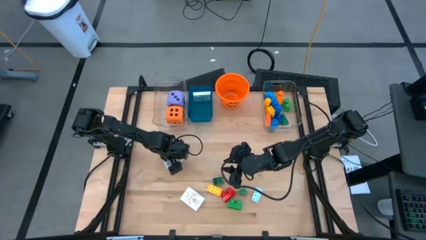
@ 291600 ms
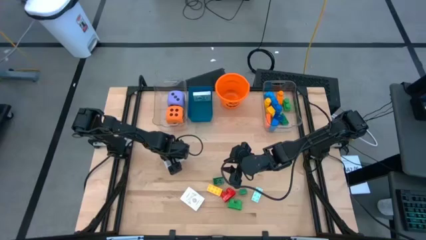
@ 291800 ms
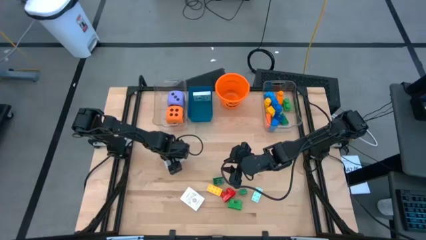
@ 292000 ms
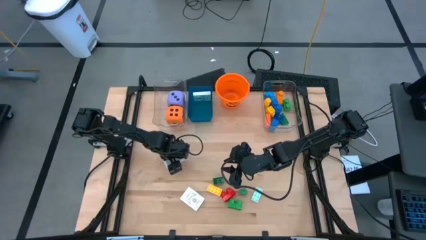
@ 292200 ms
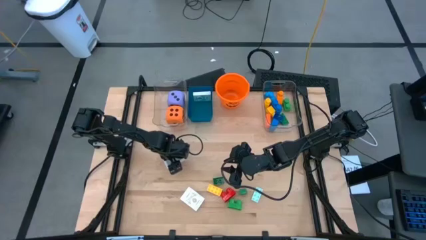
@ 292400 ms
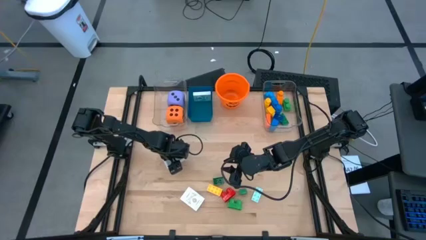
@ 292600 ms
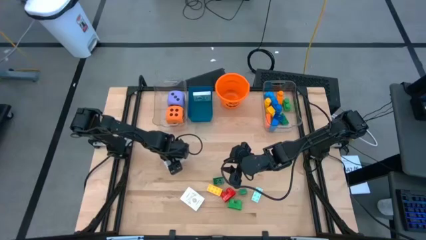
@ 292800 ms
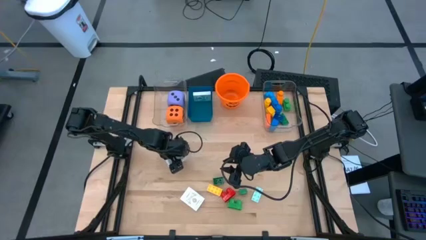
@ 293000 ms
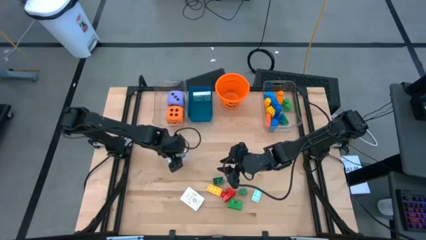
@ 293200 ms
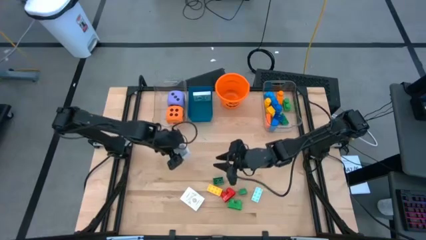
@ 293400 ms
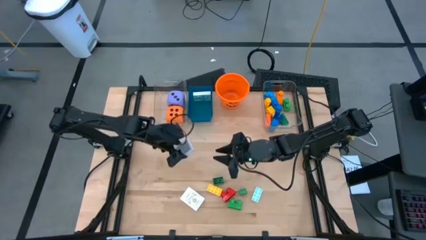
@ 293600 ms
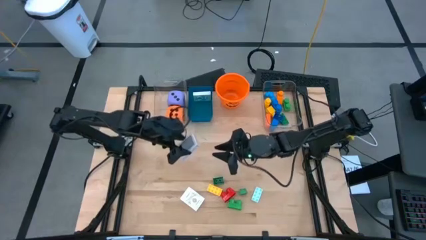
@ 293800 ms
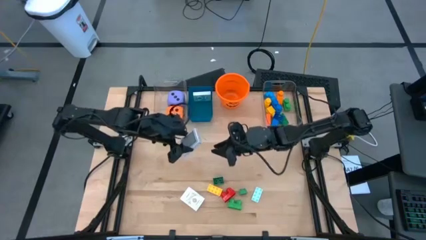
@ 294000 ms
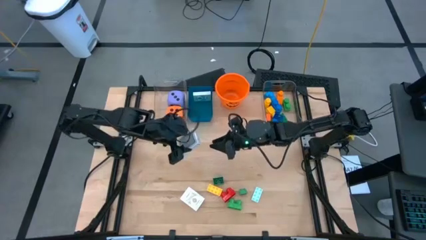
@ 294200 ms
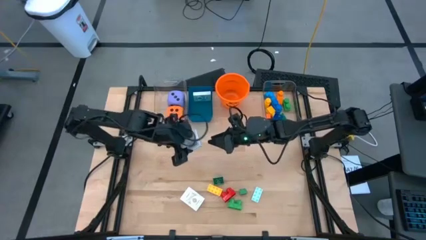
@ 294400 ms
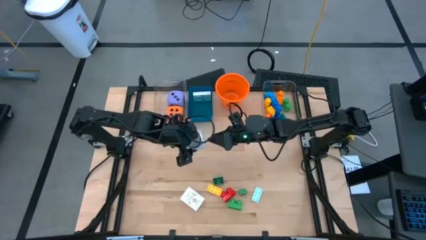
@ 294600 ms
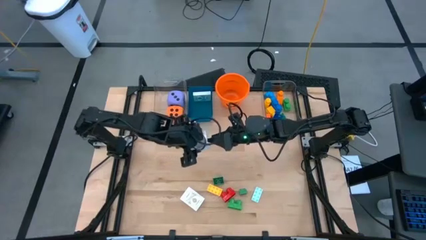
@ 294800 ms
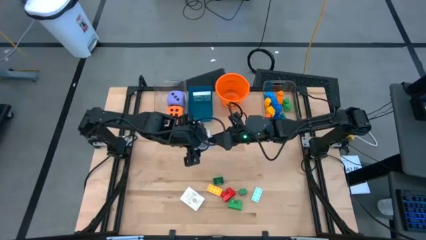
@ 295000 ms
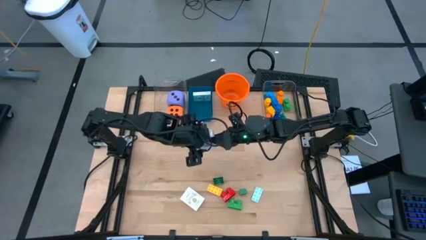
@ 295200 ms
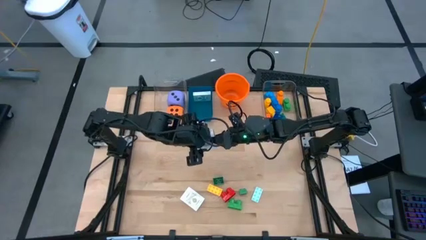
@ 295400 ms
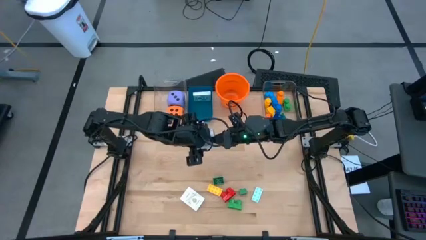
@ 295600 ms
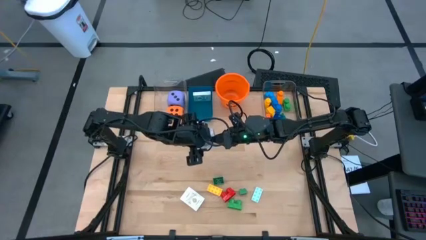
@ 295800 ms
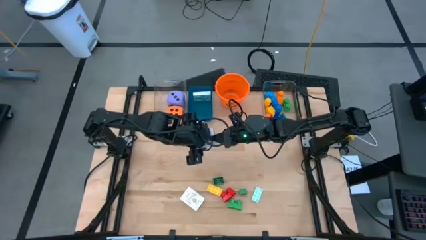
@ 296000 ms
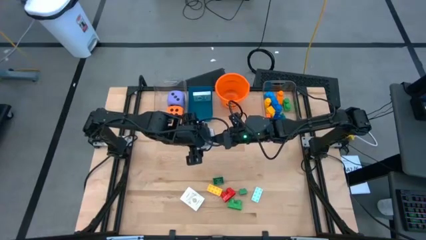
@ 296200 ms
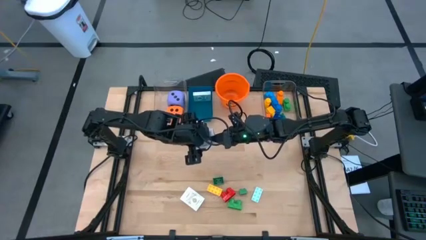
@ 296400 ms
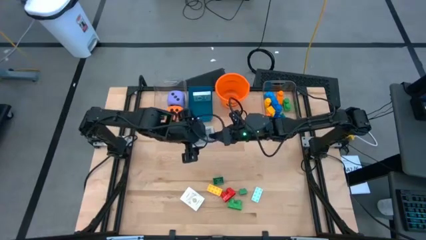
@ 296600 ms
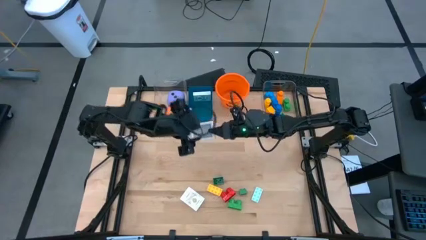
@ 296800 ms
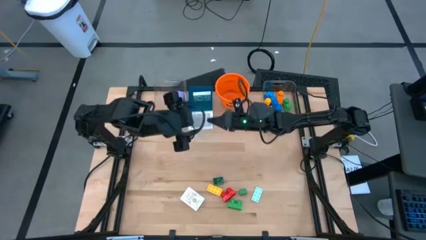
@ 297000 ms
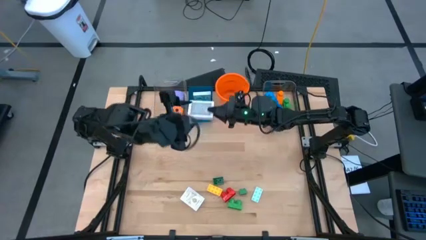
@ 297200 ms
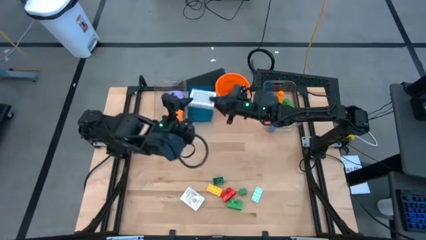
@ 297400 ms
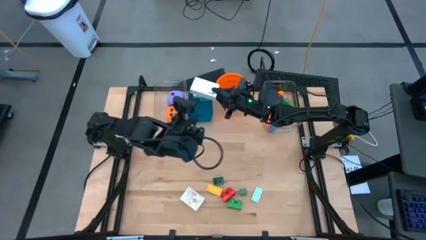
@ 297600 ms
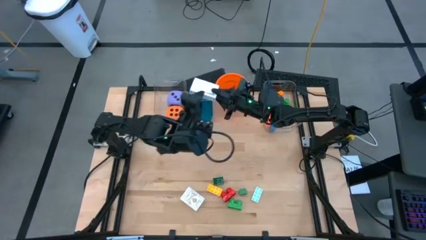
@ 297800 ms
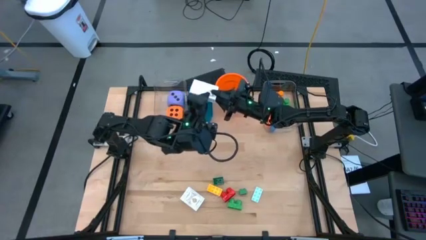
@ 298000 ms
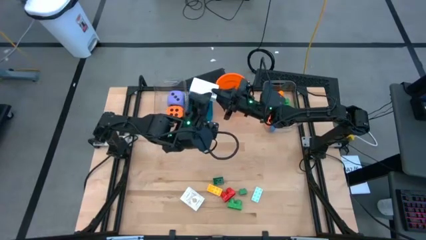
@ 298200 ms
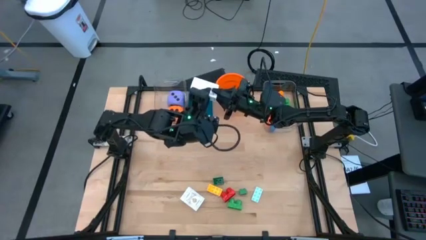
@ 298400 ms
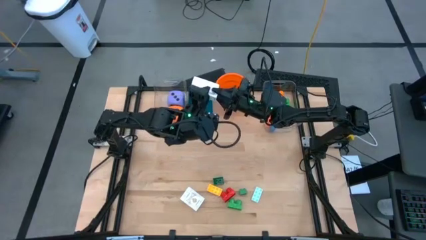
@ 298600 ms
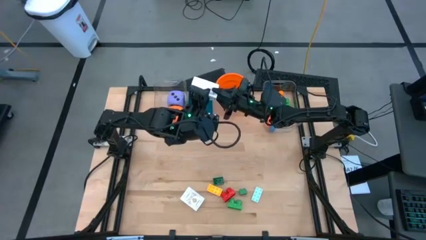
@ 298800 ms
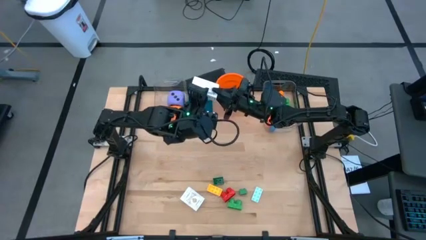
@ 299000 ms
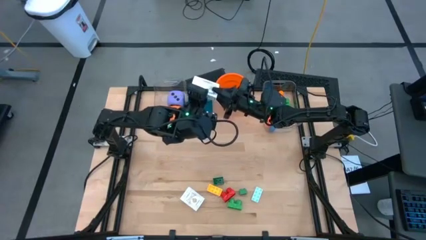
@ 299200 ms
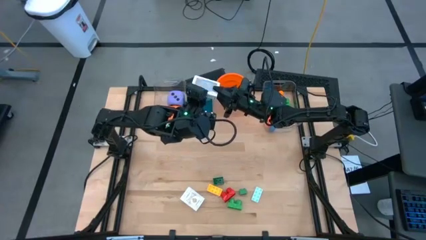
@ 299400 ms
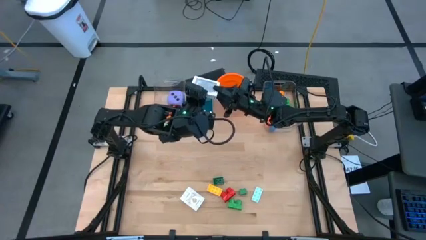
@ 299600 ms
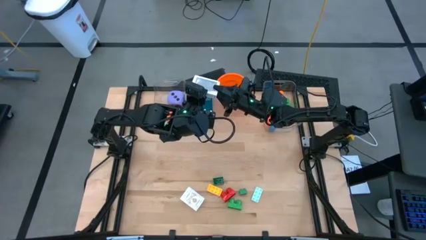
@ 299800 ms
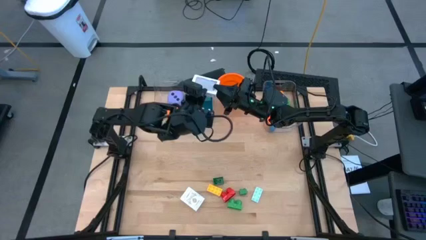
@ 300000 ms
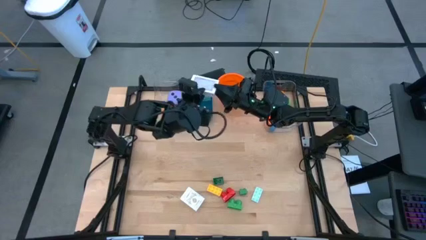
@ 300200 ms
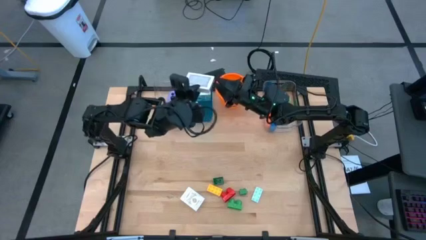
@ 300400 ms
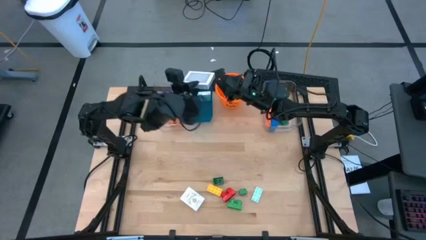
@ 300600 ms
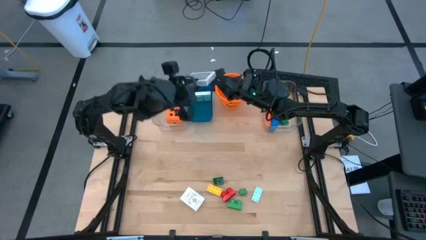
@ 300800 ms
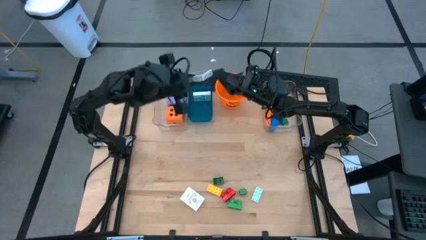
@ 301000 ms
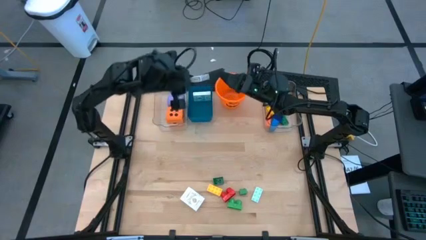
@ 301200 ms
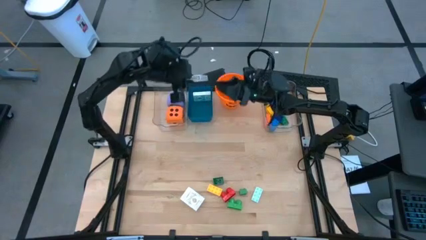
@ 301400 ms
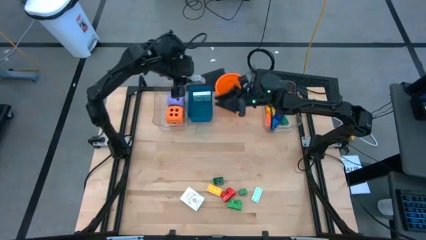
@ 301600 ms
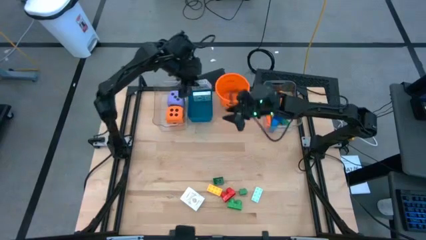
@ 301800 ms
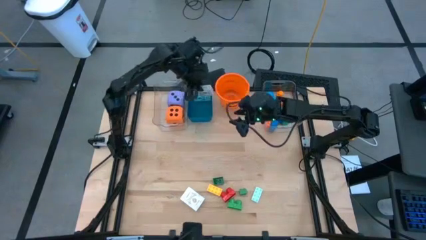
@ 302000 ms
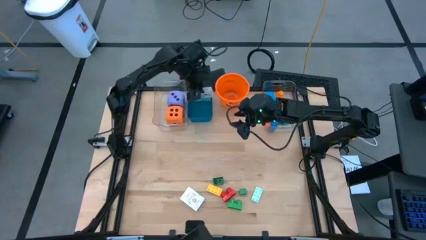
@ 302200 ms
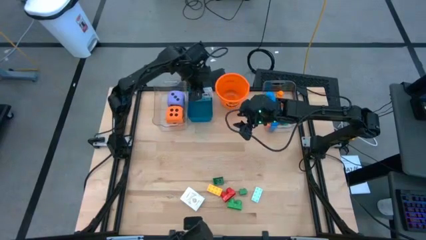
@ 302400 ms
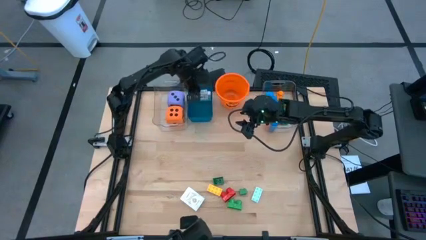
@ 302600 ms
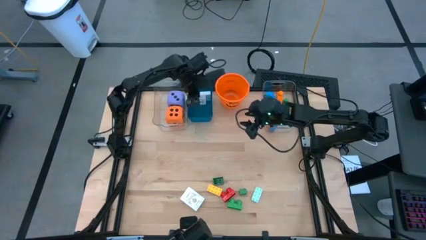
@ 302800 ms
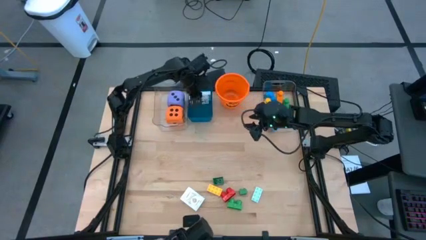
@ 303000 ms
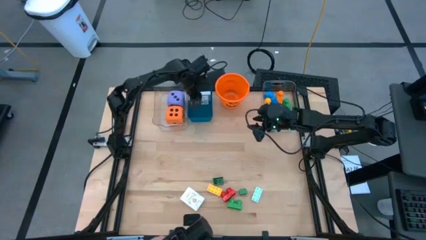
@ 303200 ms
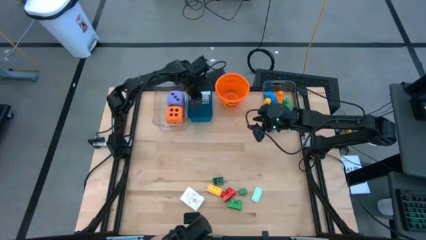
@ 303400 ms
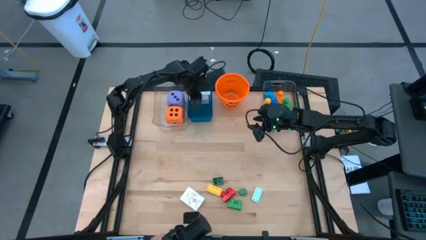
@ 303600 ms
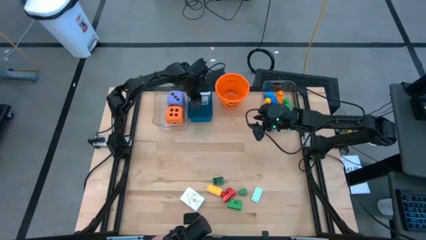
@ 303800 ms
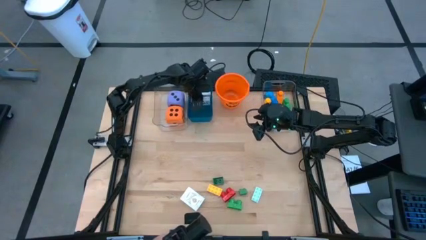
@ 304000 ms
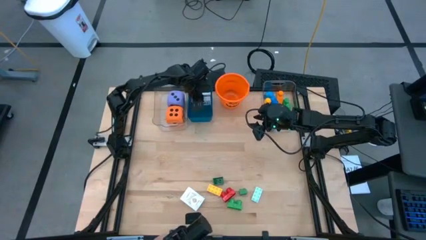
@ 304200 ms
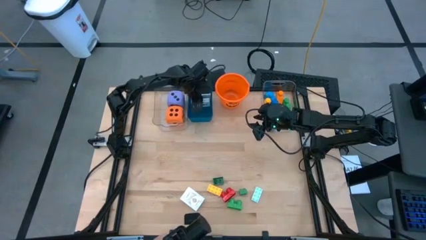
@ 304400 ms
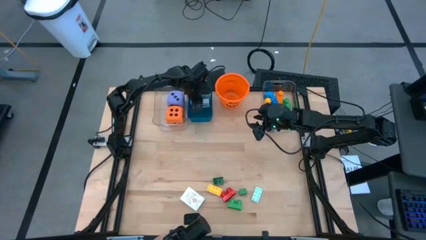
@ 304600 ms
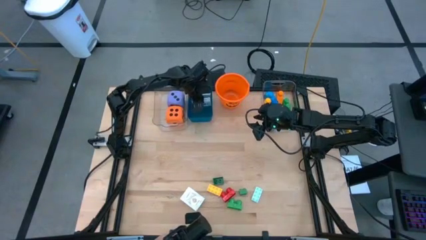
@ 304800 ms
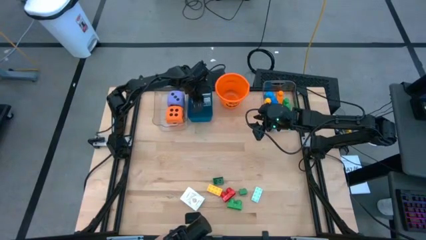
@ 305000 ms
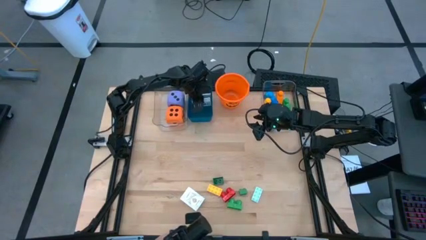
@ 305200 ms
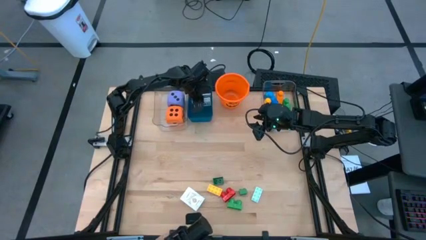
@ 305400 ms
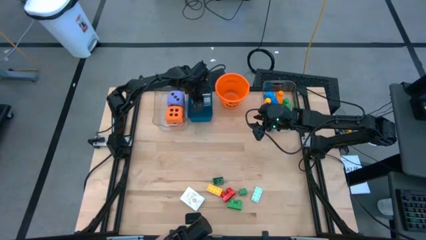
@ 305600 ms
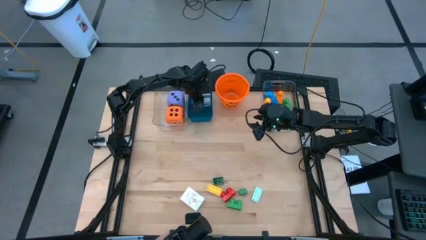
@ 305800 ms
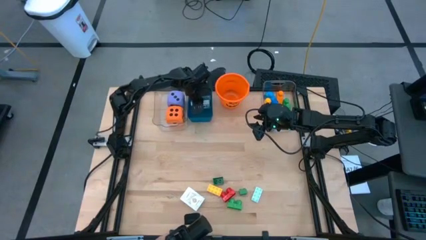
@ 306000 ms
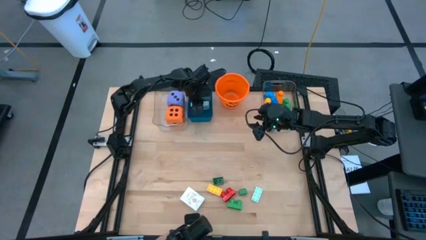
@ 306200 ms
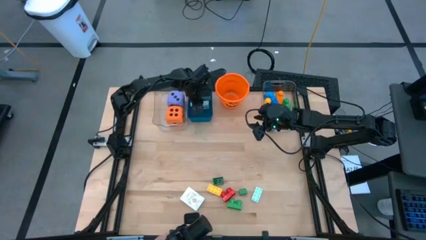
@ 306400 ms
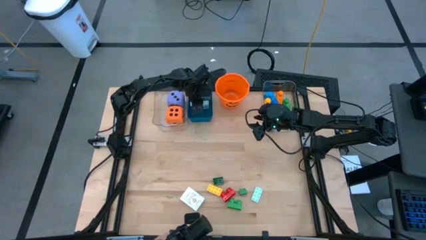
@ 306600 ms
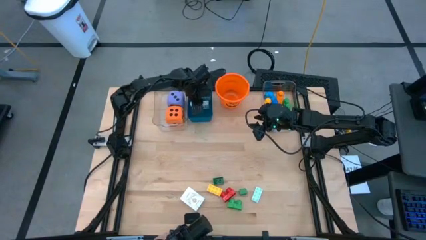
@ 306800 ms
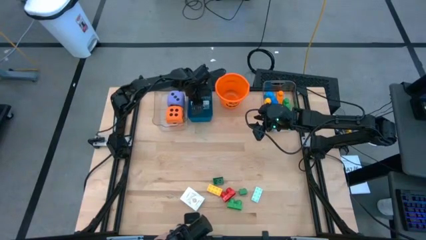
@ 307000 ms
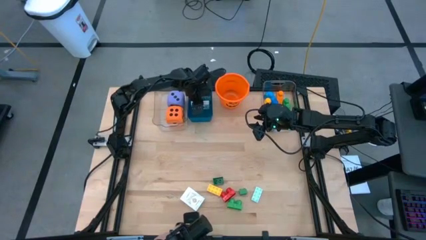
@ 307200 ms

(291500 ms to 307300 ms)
Task: Pick & Place Toys
Put the black deck of cards into the blue bin
